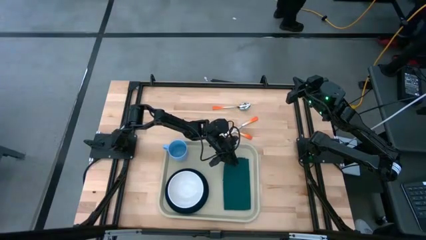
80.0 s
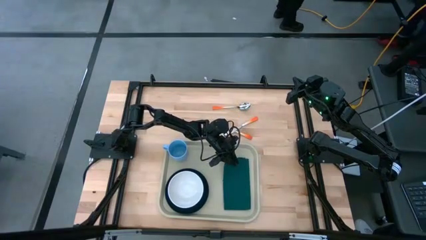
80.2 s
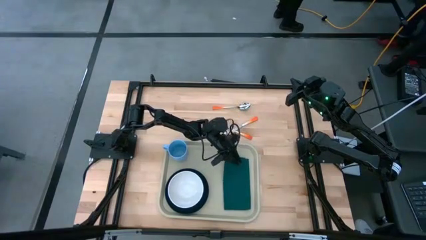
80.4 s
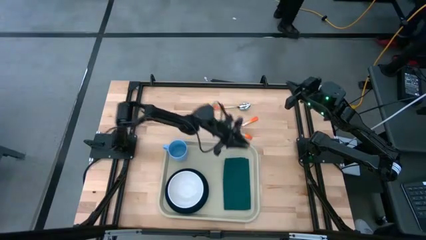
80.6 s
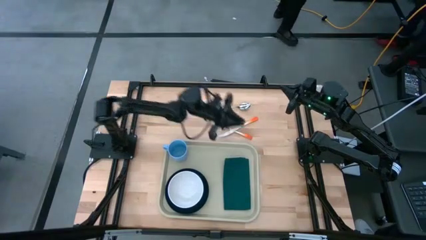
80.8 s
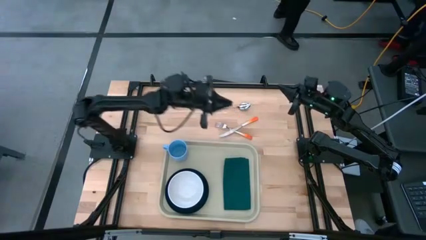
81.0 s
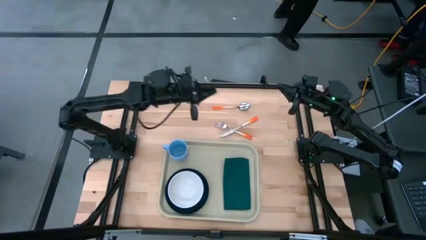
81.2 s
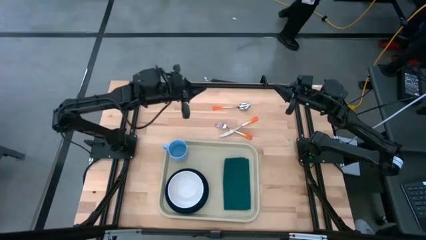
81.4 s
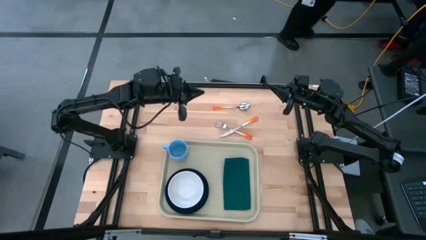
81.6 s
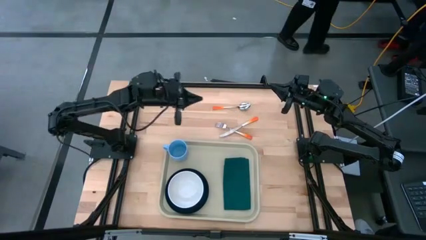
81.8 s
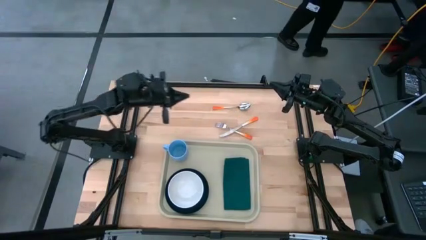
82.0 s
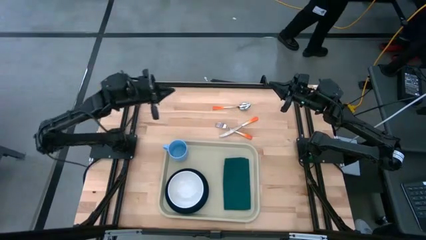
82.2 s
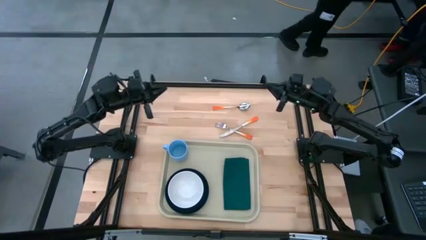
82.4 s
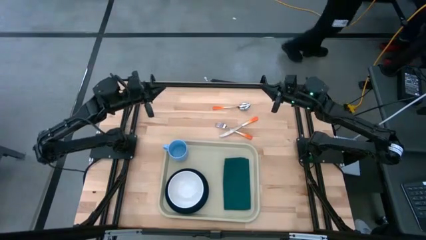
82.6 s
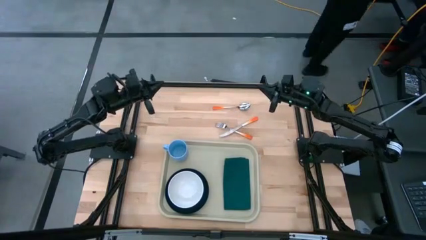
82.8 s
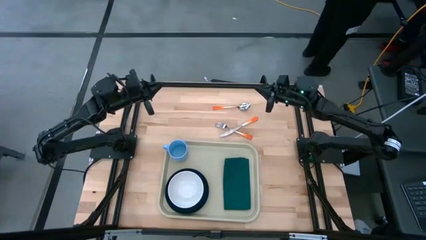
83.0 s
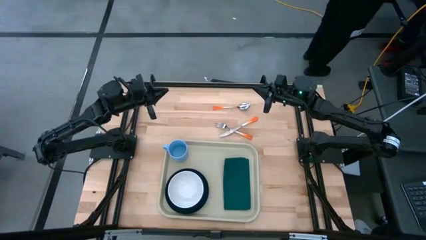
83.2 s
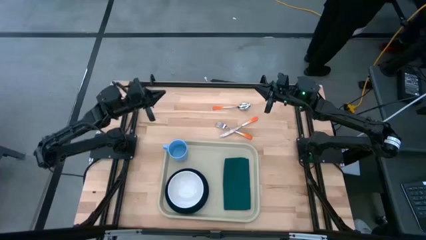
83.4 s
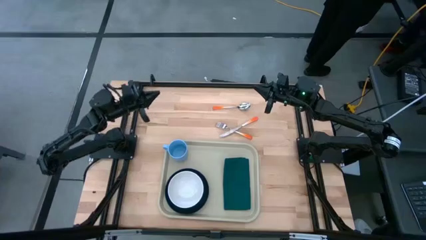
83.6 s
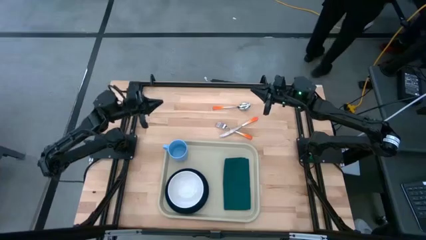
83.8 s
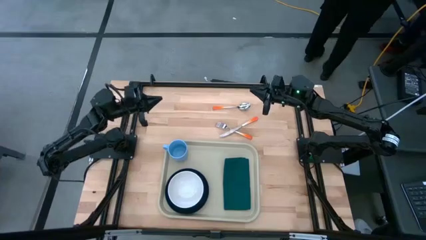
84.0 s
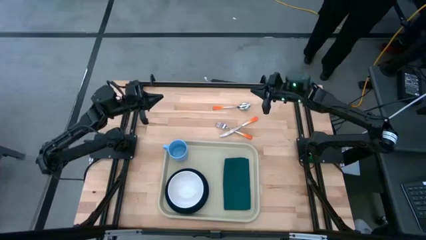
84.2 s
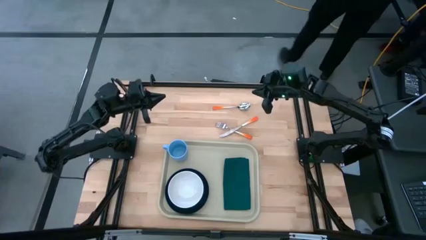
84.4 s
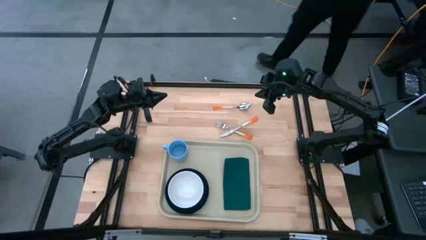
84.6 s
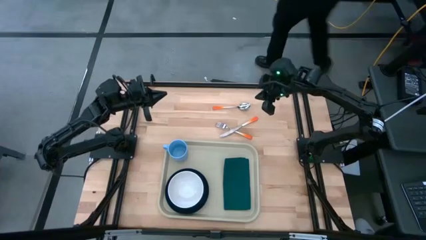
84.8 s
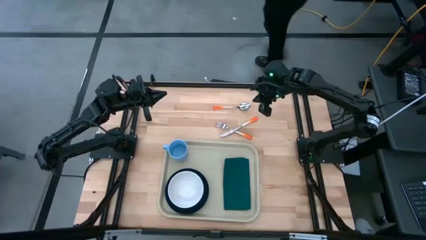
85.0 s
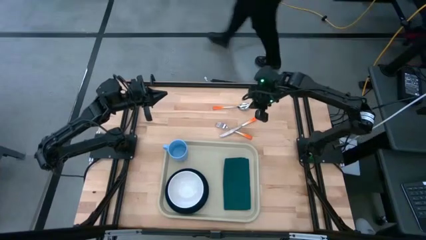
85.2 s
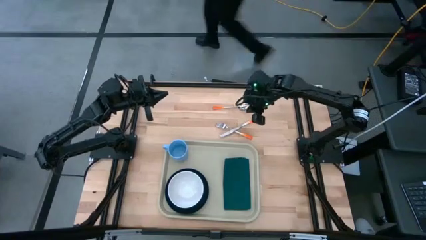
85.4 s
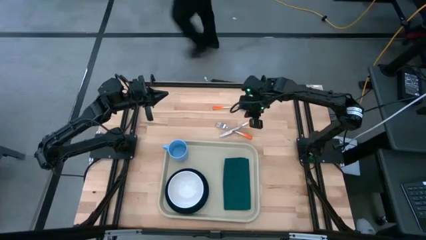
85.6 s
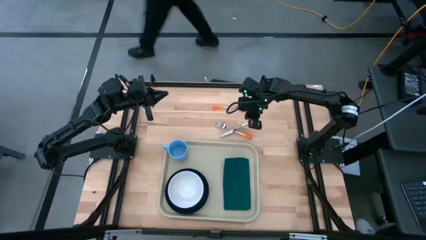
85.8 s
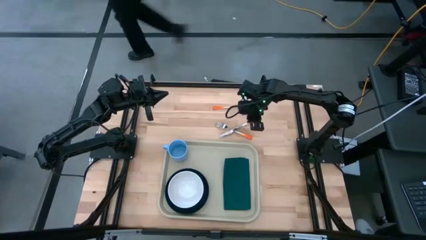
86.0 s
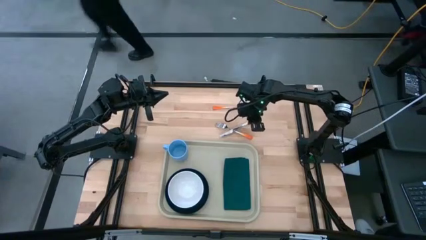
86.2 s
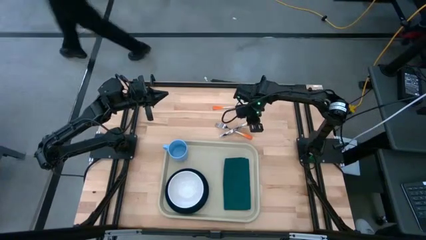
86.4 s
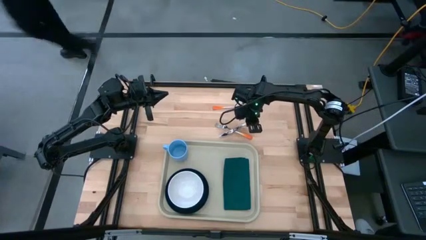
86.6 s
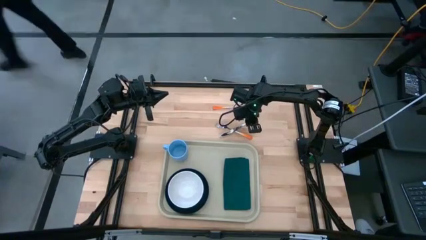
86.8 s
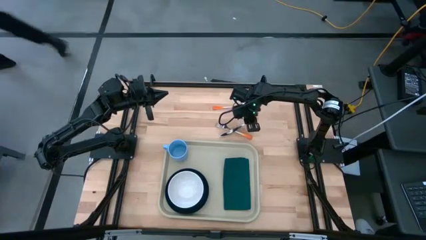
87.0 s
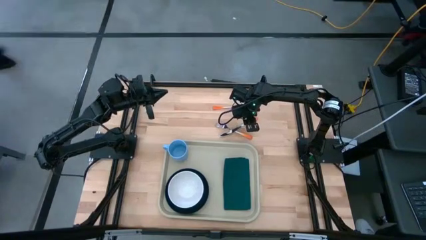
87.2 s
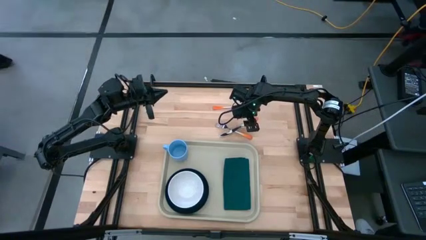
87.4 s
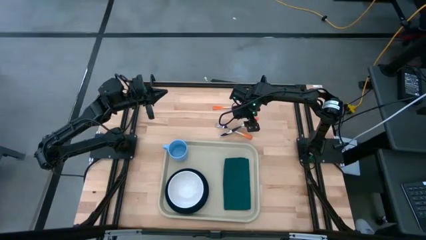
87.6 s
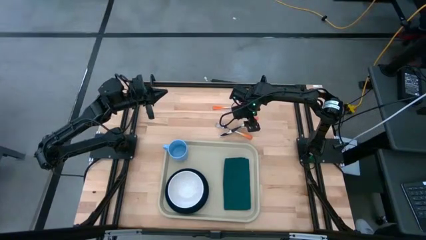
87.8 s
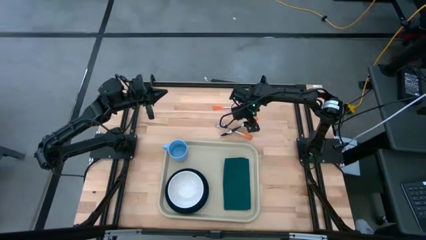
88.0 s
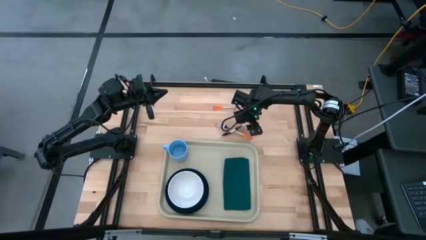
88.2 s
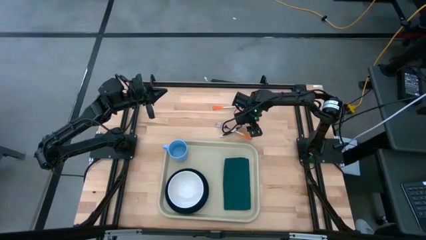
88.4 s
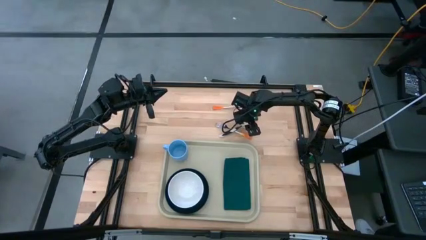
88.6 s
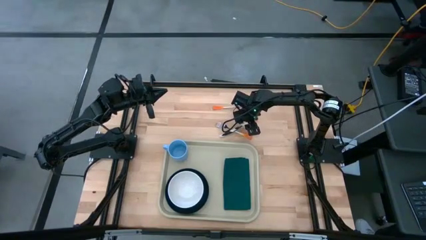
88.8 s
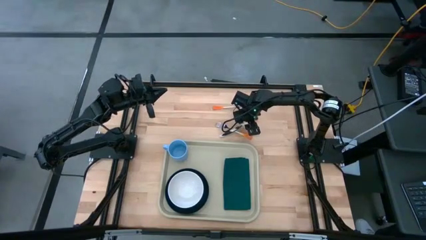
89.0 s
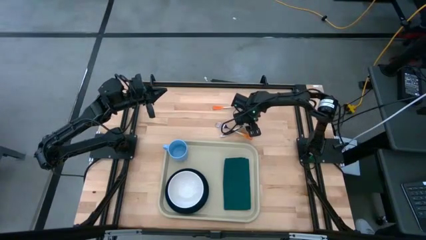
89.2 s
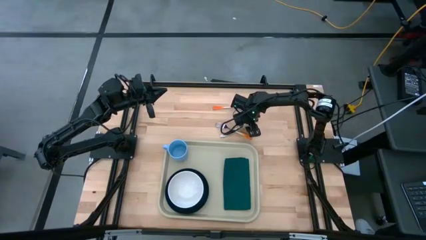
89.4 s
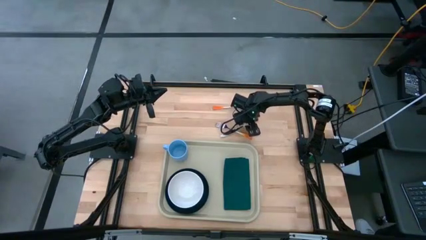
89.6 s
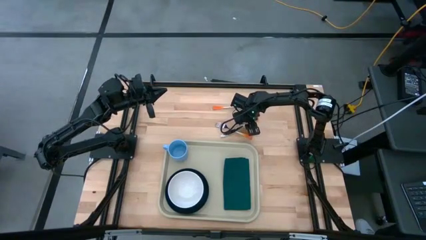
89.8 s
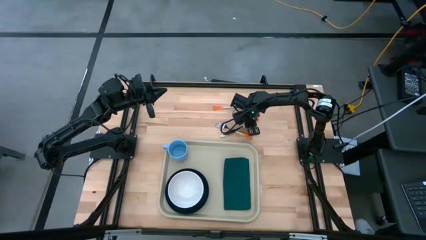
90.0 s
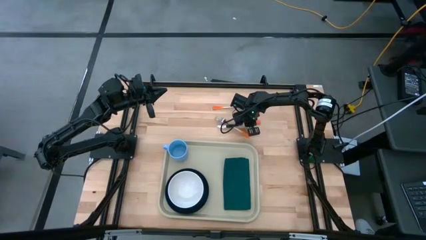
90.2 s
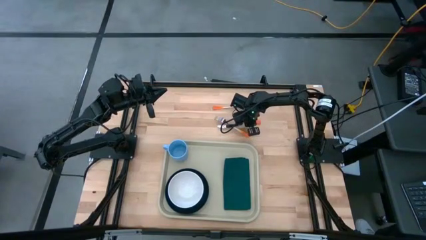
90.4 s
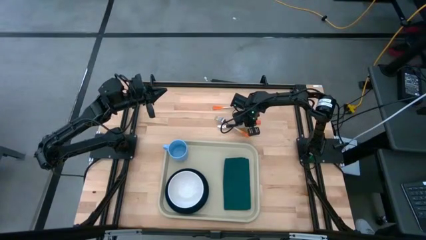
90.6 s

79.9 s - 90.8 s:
Task: Set up tray
Put the orange knife on top of the green napkin on the gray tray

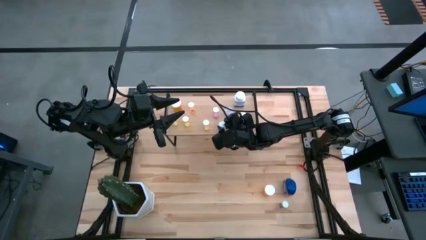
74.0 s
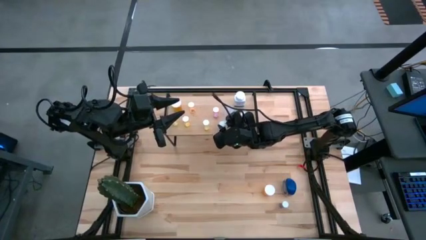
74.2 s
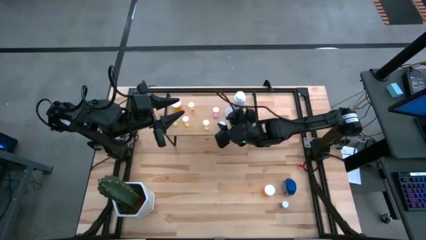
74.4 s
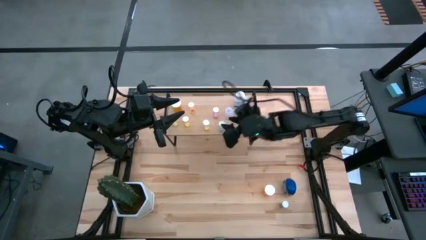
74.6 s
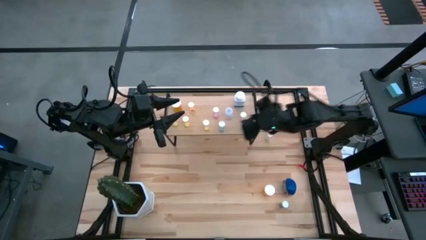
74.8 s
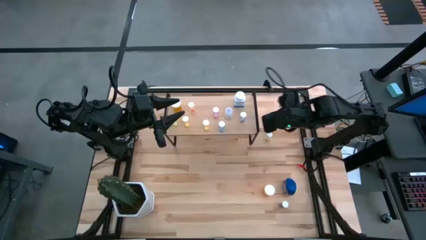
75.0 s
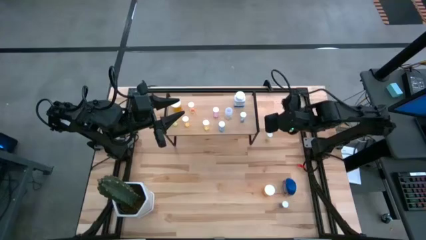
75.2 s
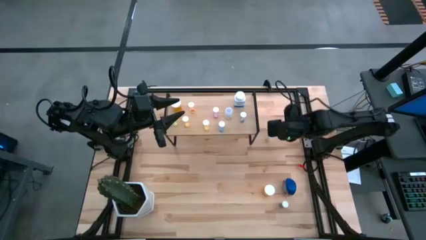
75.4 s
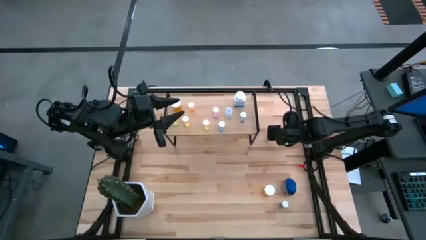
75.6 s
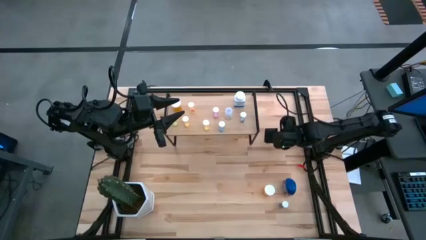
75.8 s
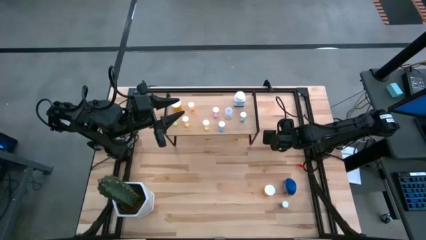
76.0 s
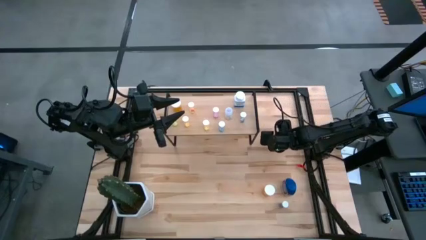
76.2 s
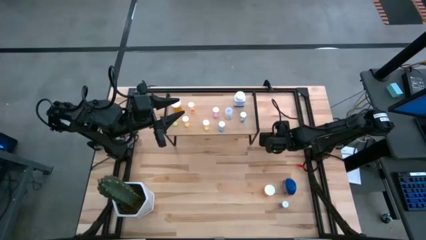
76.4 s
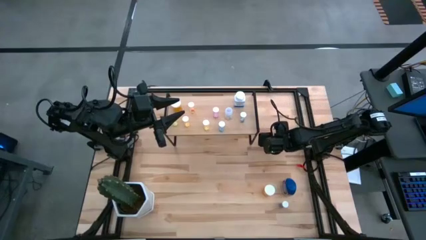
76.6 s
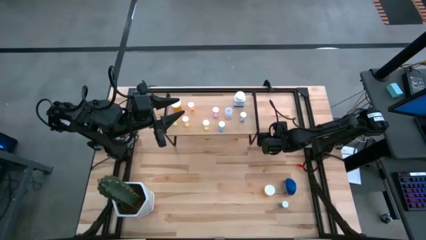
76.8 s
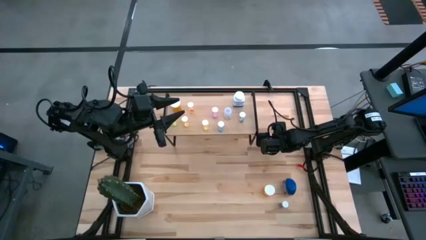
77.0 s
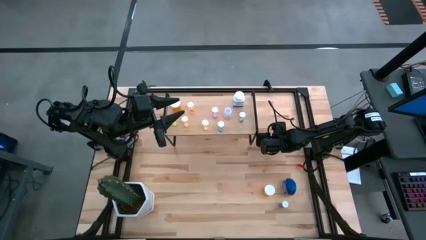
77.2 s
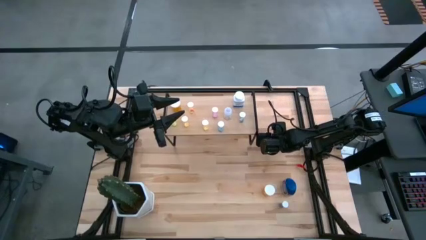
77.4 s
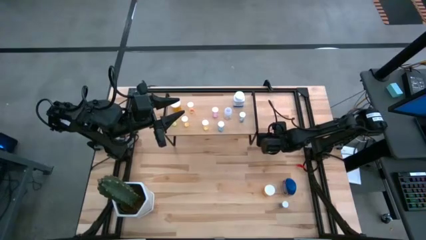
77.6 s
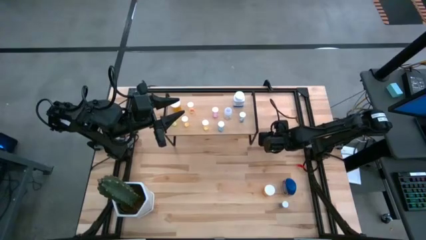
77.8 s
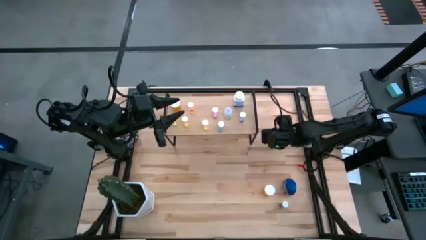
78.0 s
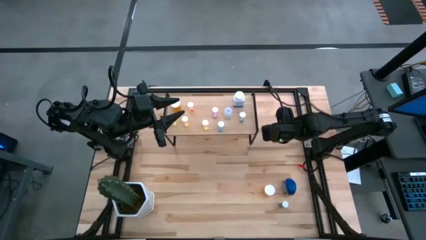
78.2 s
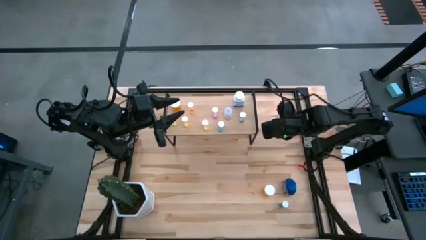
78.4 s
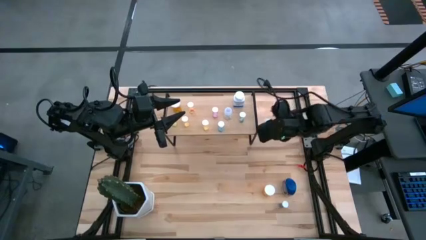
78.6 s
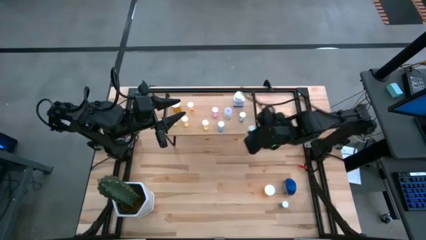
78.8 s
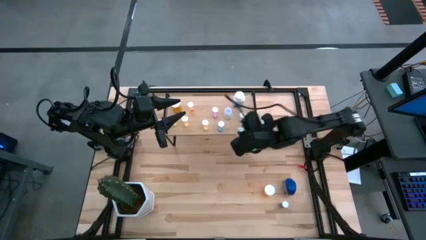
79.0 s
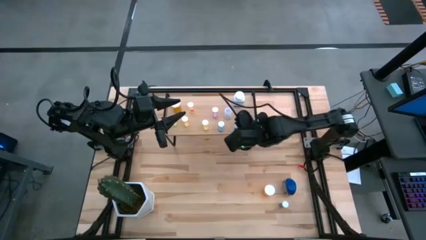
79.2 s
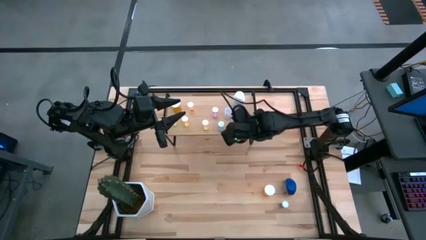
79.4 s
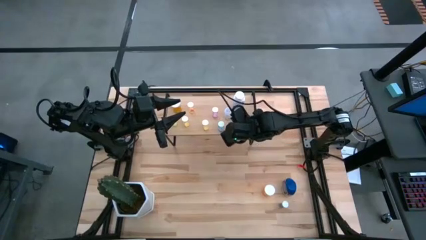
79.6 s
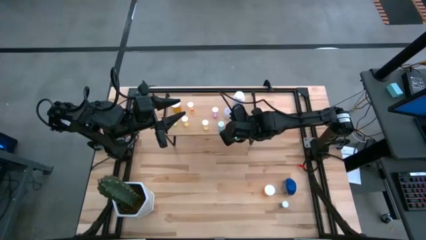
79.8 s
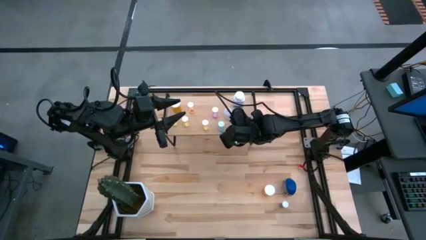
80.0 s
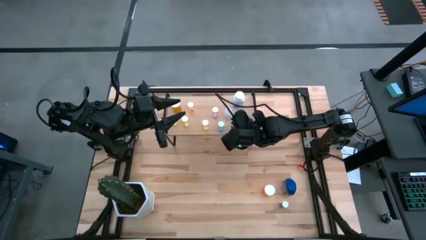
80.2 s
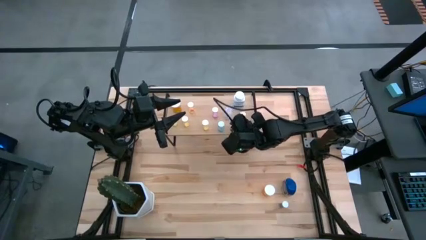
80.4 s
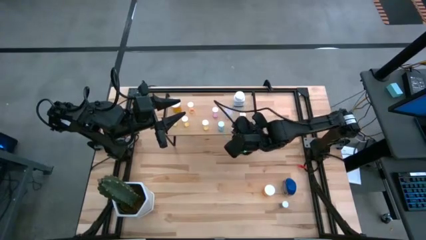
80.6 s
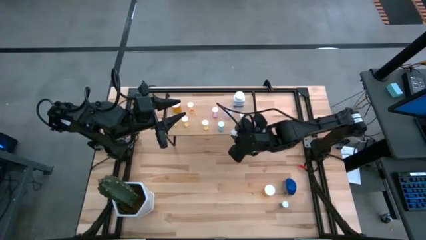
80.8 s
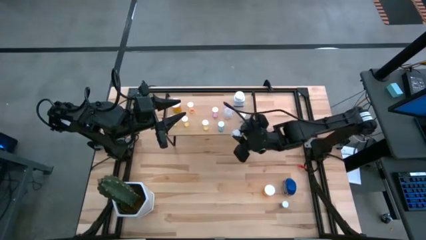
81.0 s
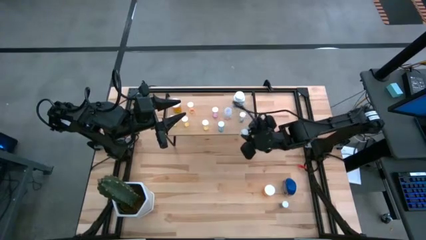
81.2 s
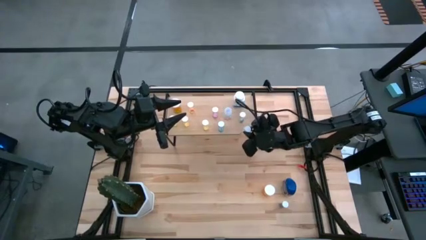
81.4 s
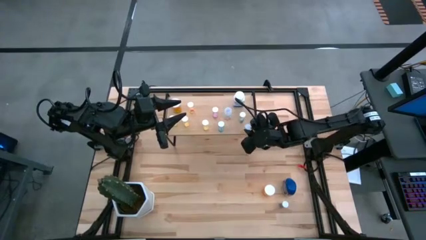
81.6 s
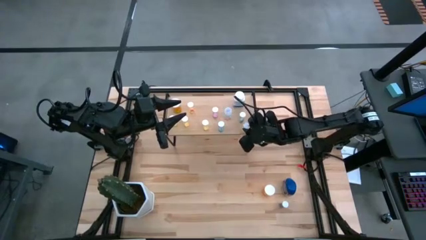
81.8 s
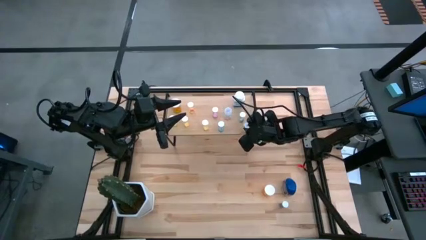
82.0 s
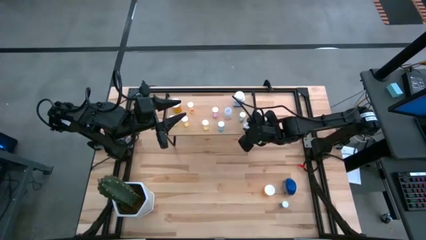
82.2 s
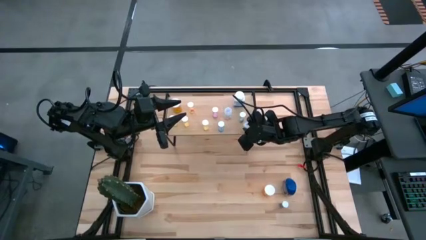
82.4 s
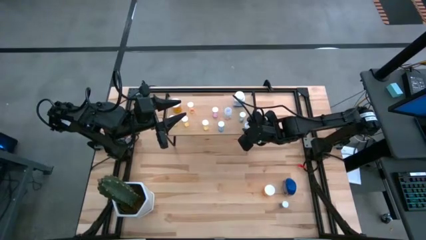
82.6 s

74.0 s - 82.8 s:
Task: Pick and place medicine bottles onto shelf by color
Put the yellow pill bottle on the shelf
